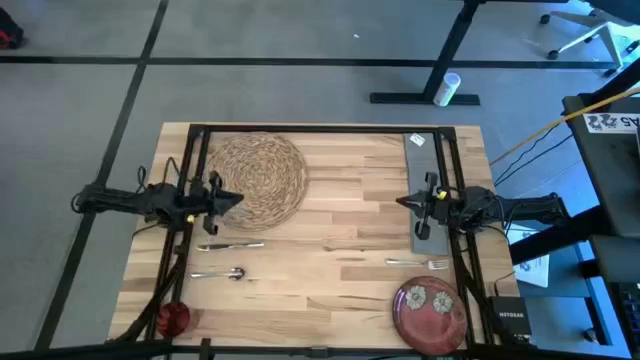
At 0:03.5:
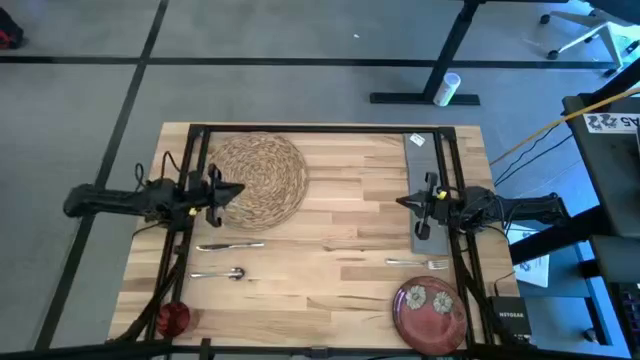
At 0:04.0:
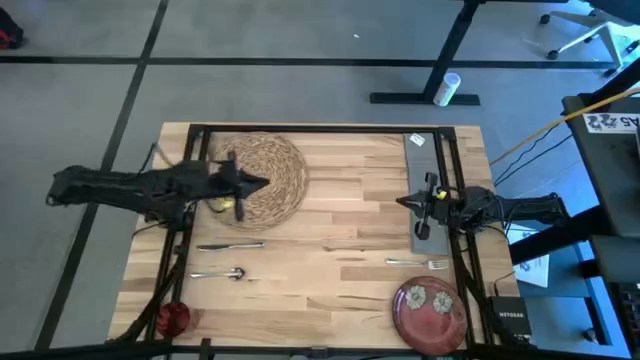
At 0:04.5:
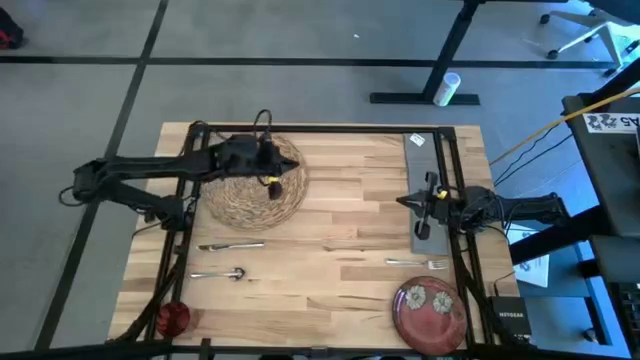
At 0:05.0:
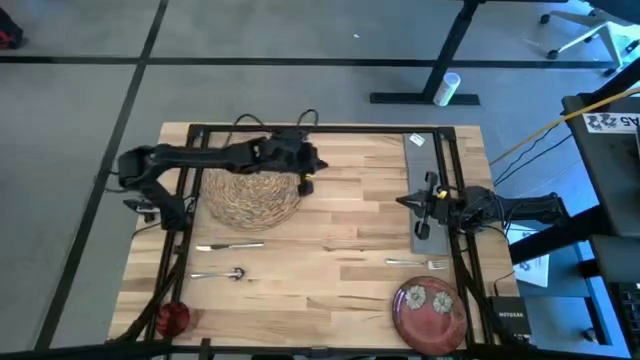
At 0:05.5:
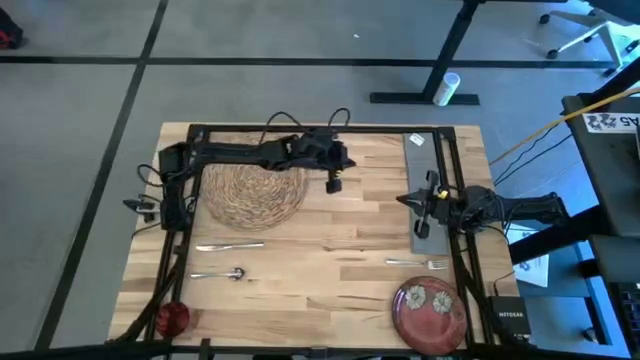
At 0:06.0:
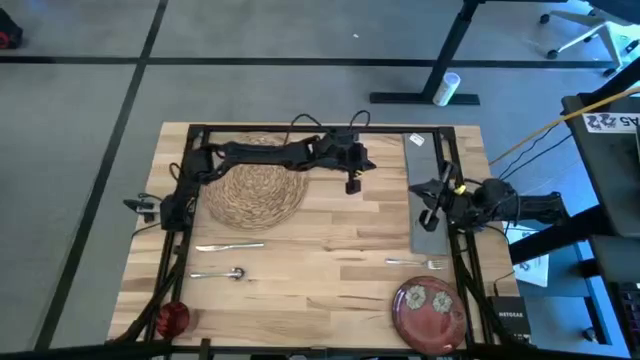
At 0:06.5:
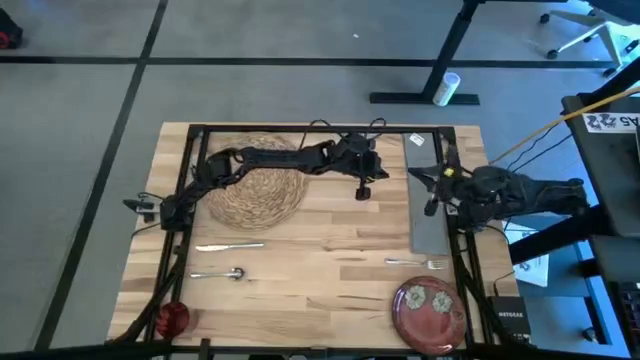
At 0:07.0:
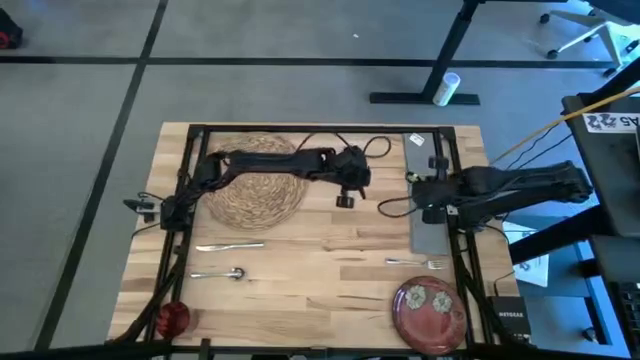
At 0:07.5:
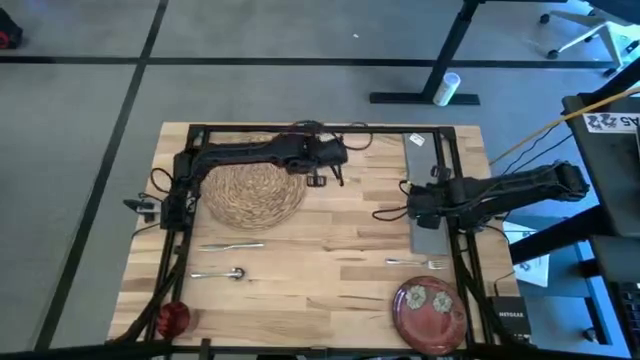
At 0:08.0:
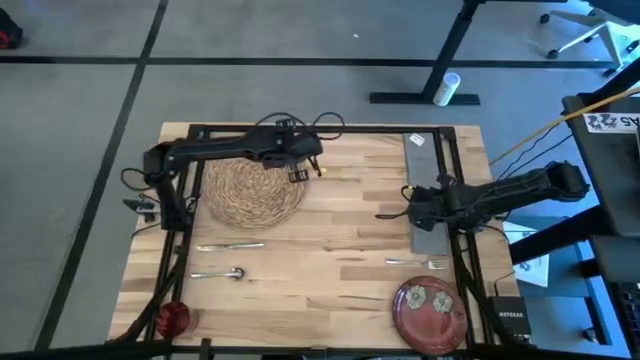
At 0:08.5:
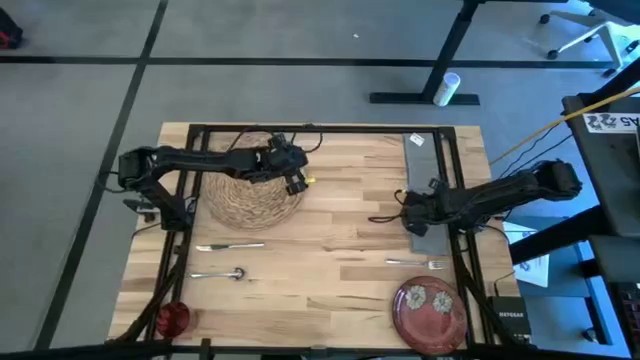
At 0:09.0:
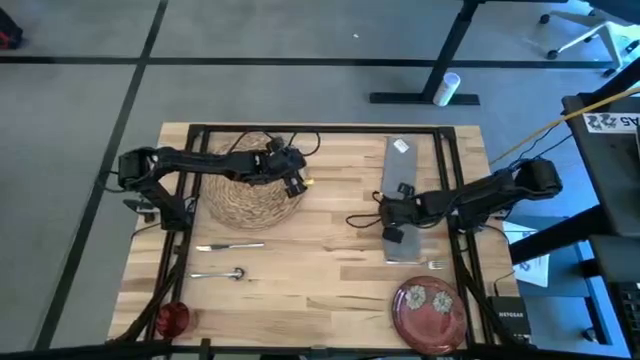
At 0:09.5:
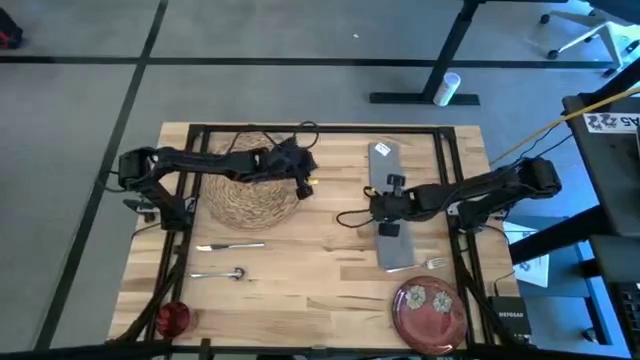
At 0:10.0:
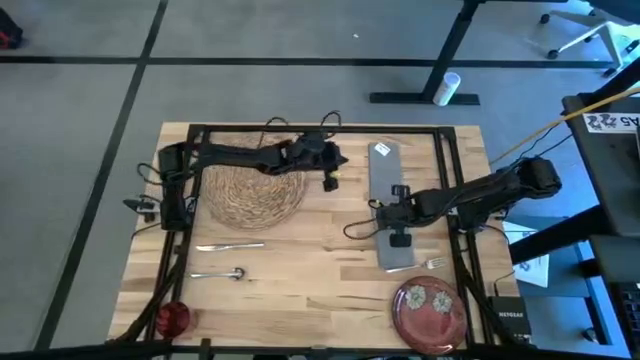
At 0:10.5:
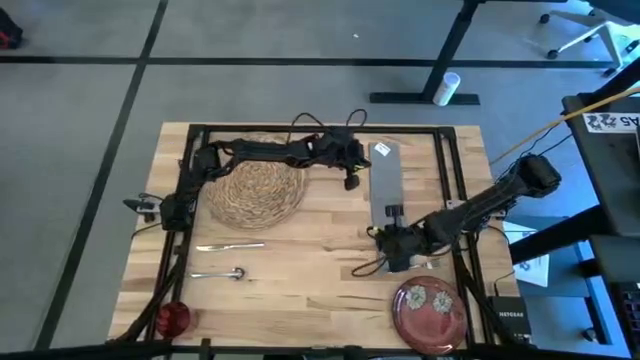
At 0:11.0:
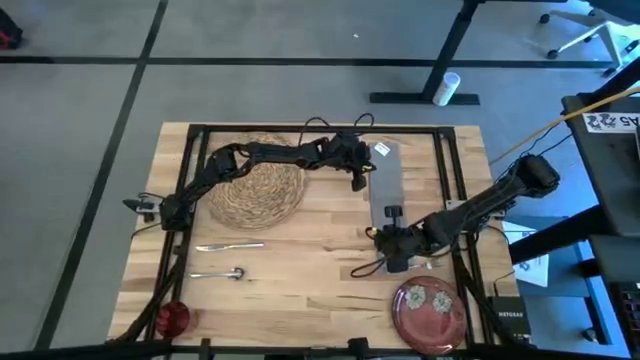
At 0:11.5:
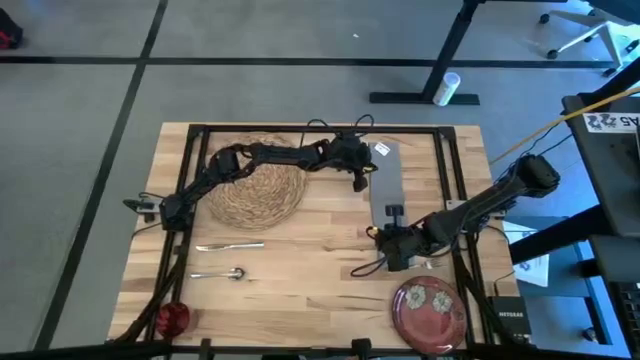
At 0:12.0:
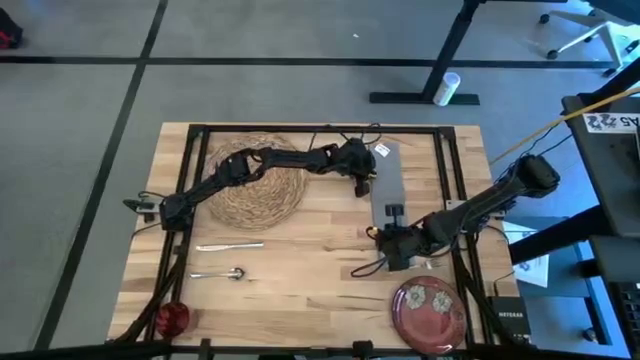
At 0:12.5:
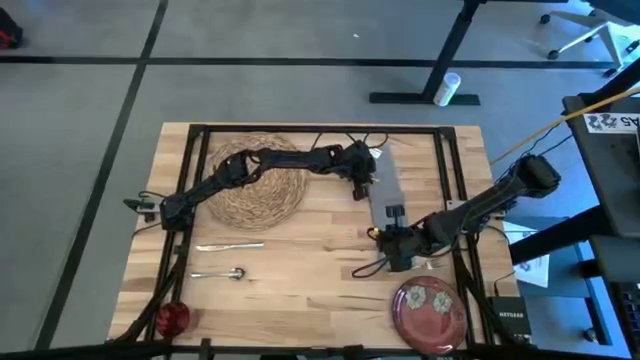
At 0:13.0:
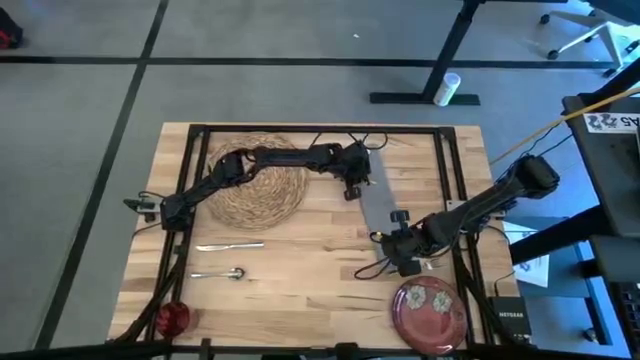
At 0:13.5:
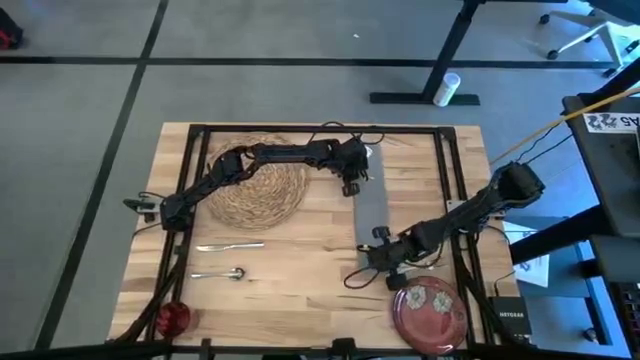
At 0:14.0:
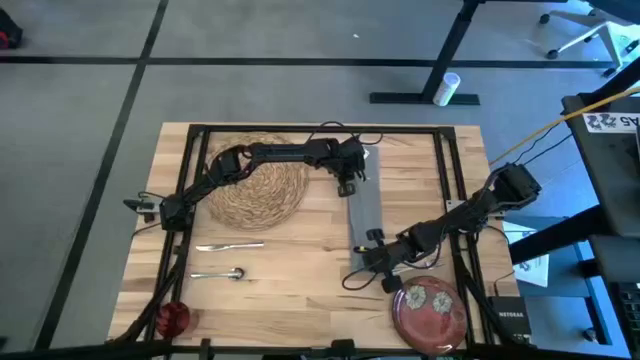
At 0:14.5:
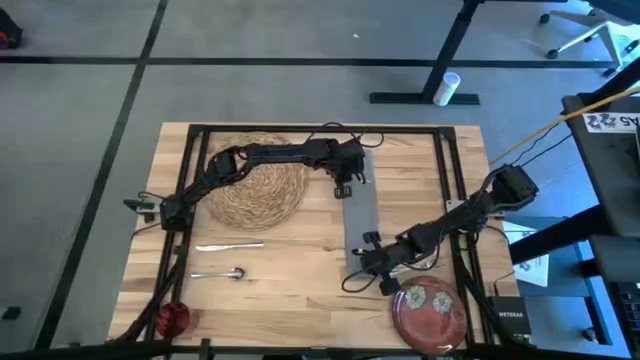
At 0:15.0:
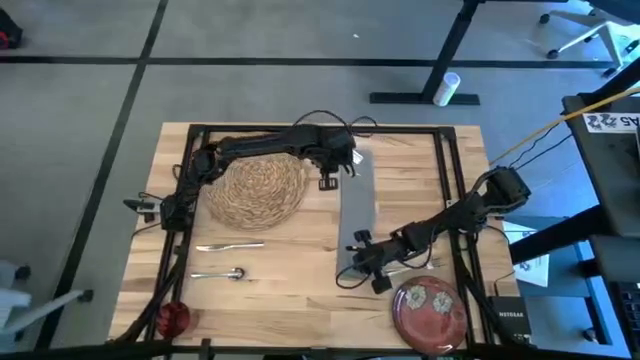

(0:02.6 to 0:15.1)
Task: Set table place
Fold the gray table napkin
